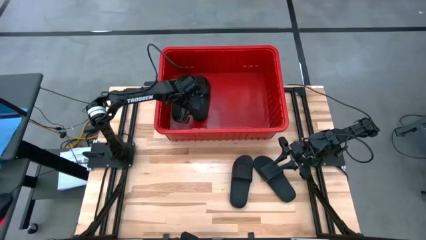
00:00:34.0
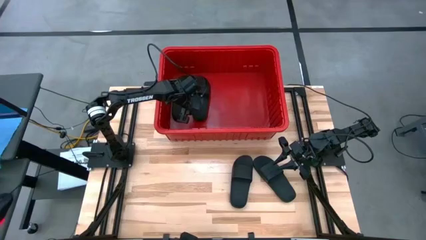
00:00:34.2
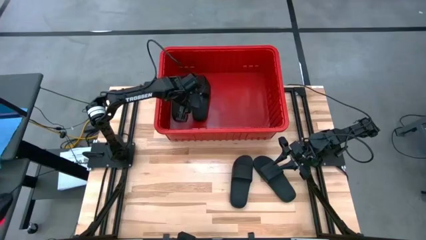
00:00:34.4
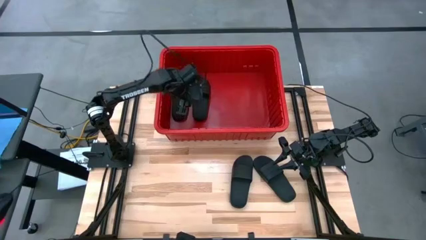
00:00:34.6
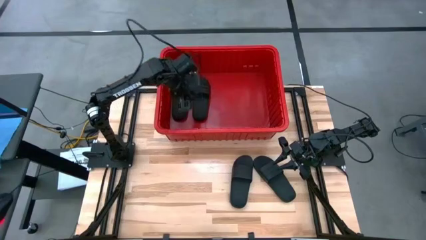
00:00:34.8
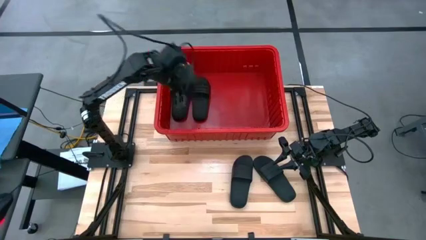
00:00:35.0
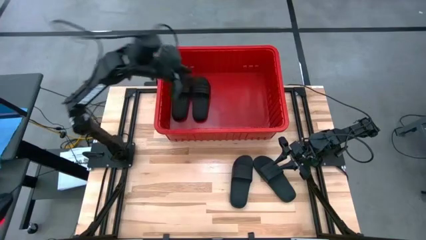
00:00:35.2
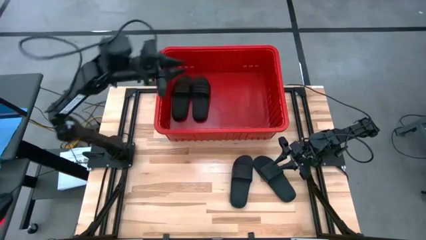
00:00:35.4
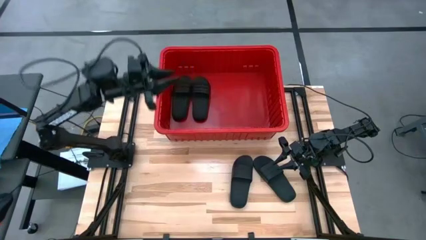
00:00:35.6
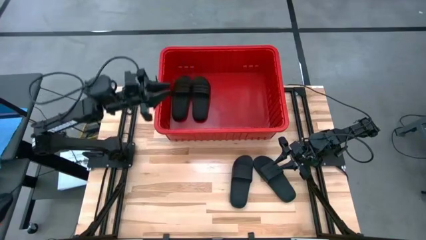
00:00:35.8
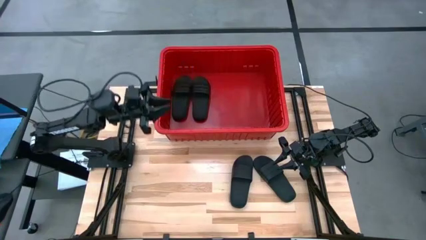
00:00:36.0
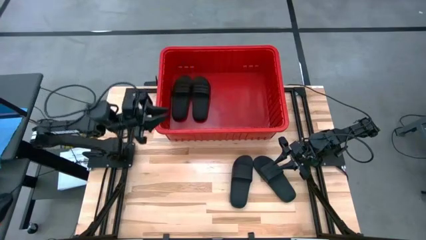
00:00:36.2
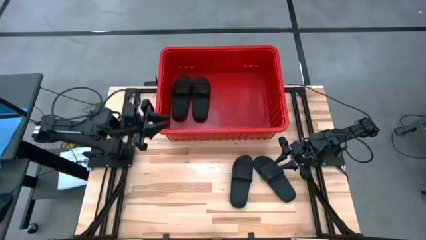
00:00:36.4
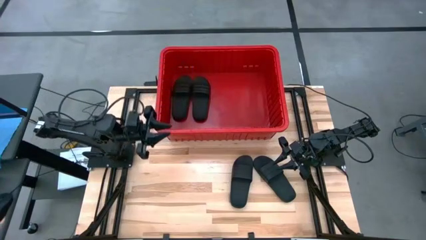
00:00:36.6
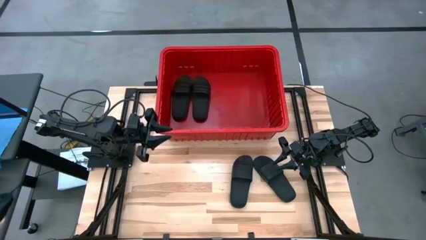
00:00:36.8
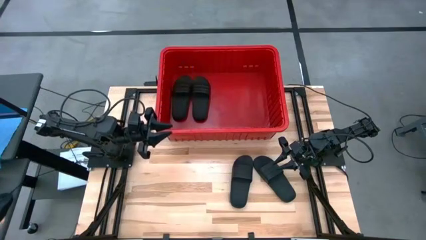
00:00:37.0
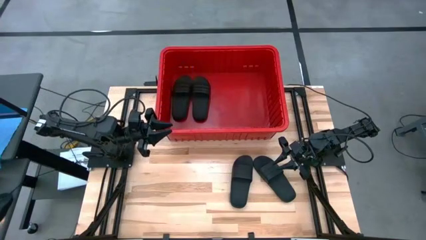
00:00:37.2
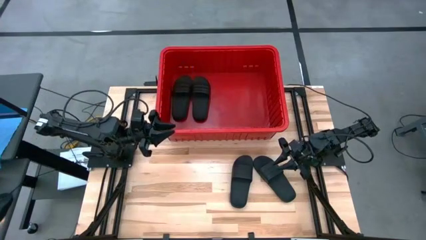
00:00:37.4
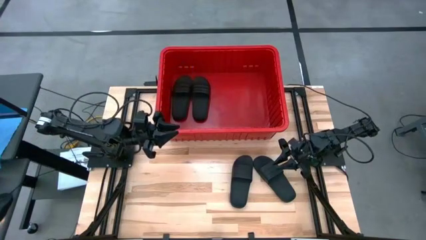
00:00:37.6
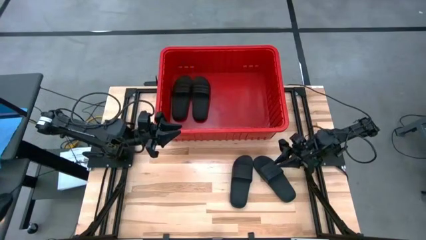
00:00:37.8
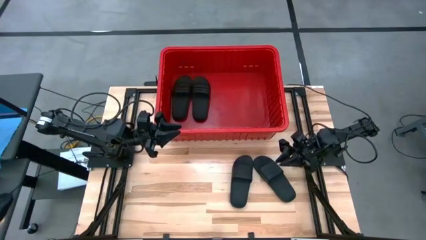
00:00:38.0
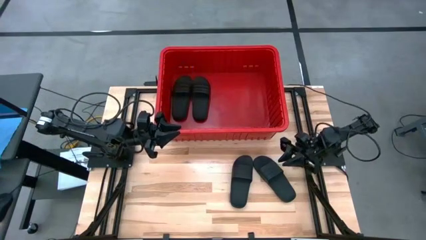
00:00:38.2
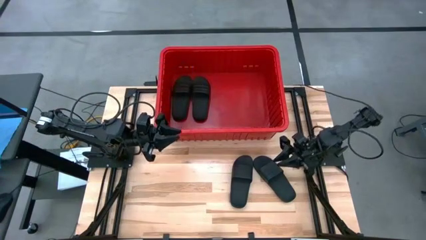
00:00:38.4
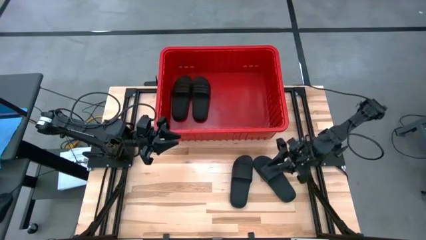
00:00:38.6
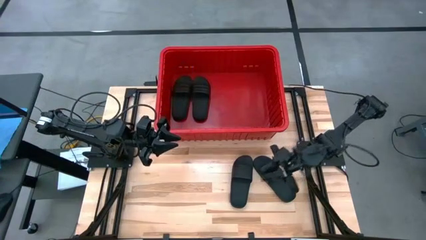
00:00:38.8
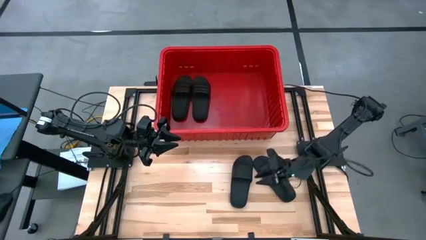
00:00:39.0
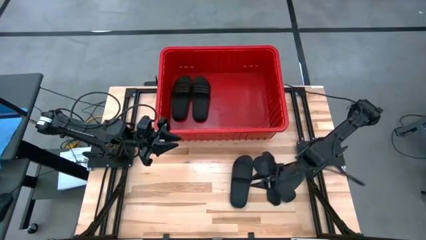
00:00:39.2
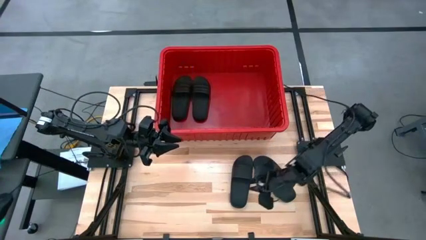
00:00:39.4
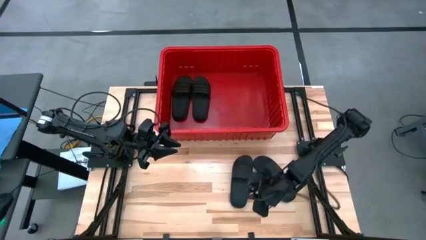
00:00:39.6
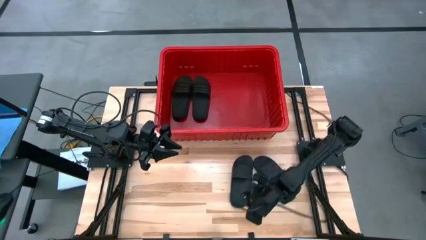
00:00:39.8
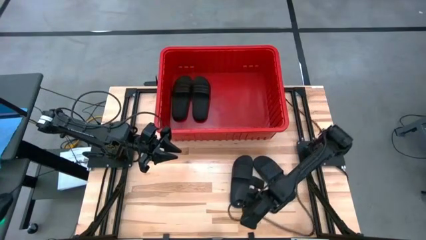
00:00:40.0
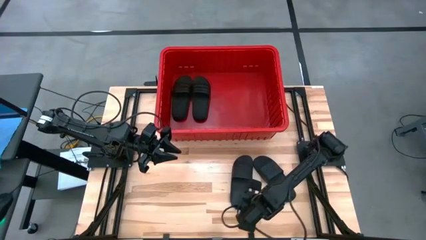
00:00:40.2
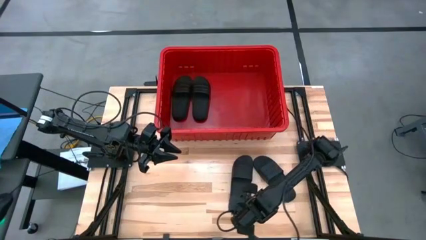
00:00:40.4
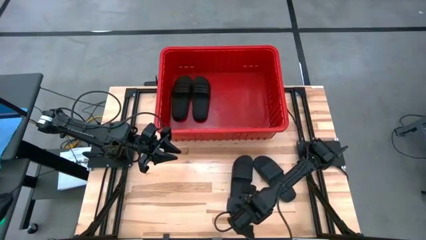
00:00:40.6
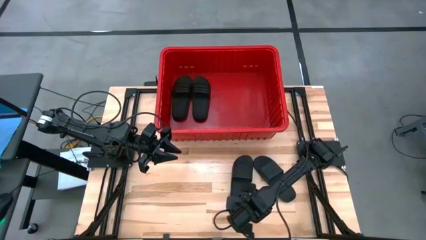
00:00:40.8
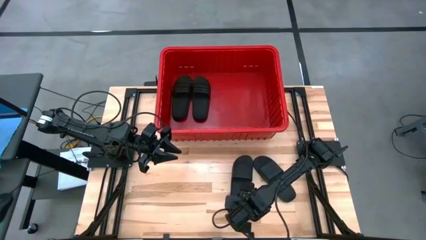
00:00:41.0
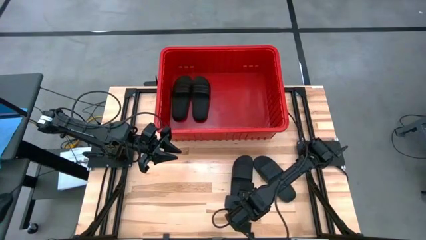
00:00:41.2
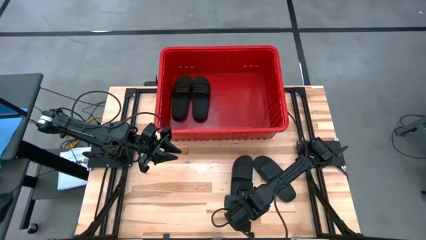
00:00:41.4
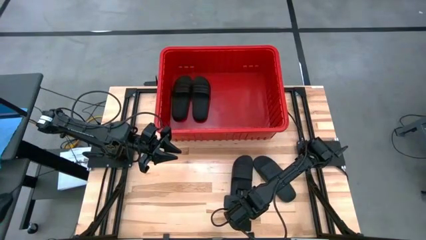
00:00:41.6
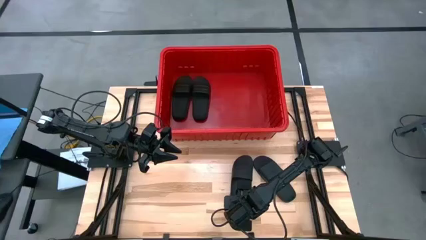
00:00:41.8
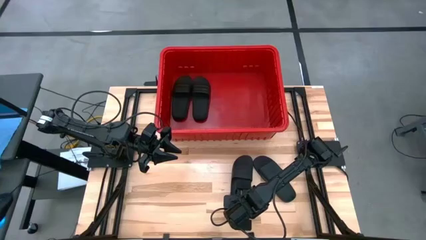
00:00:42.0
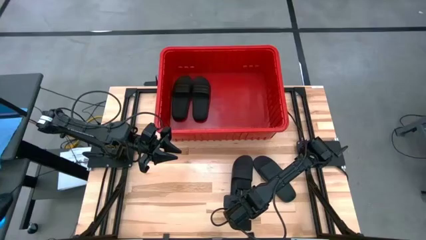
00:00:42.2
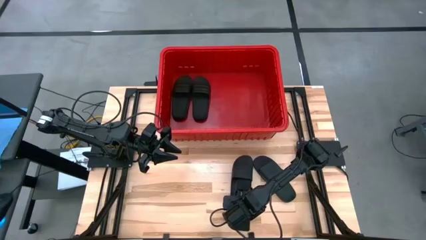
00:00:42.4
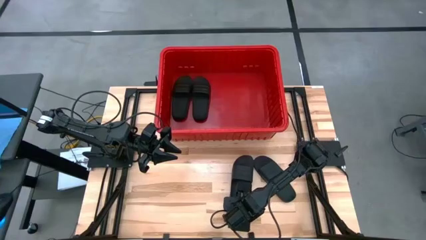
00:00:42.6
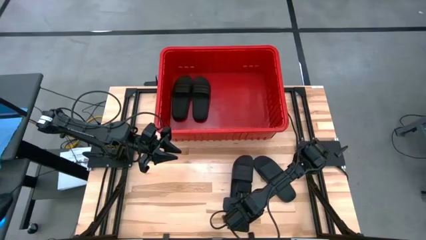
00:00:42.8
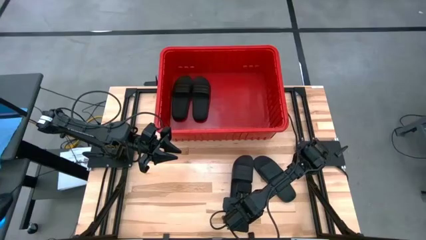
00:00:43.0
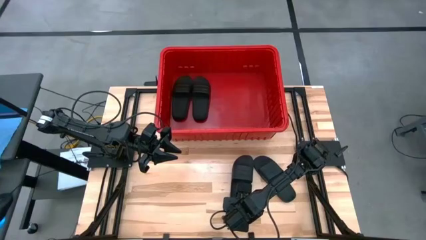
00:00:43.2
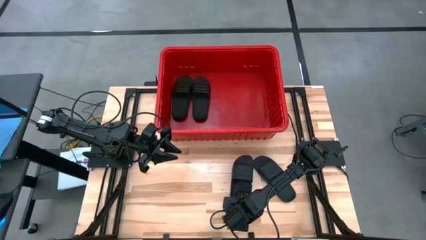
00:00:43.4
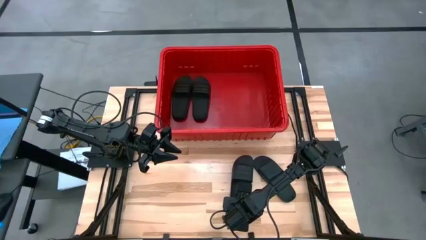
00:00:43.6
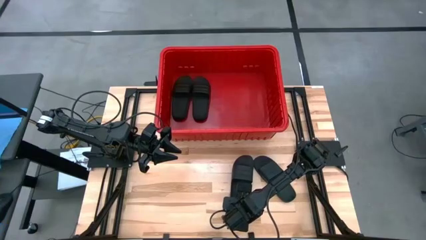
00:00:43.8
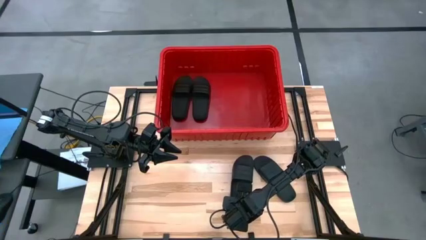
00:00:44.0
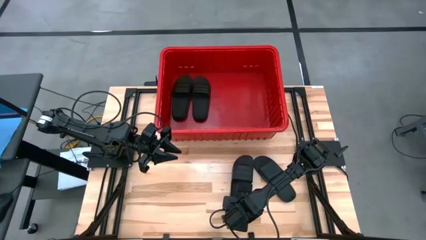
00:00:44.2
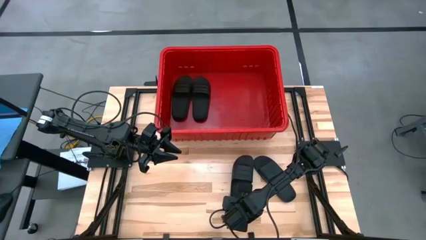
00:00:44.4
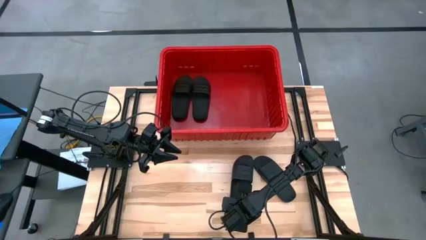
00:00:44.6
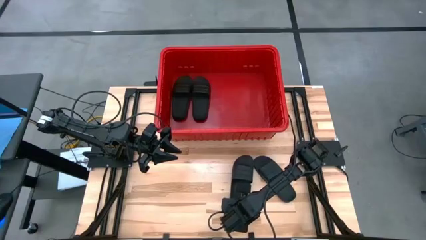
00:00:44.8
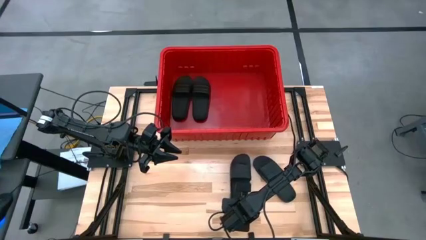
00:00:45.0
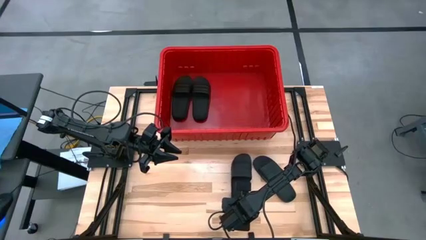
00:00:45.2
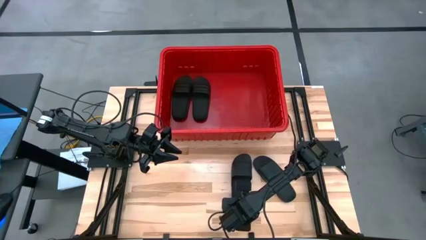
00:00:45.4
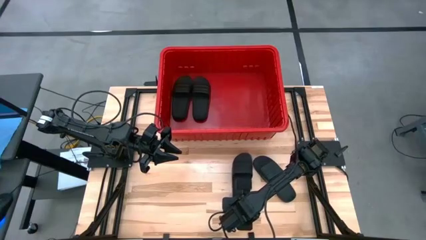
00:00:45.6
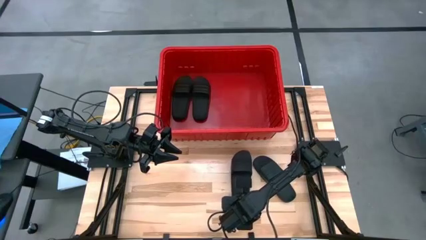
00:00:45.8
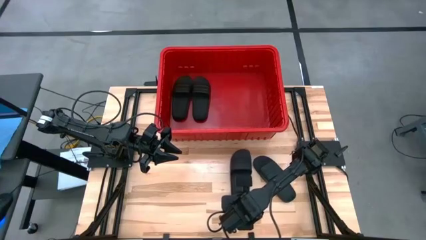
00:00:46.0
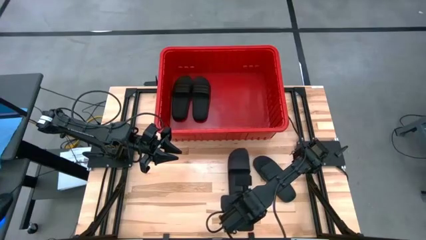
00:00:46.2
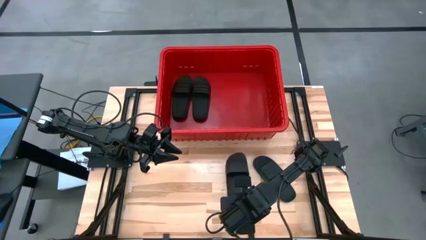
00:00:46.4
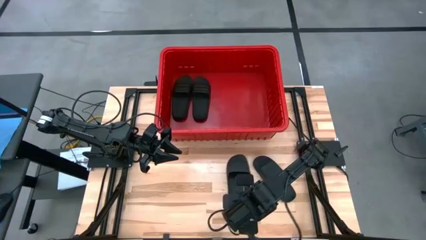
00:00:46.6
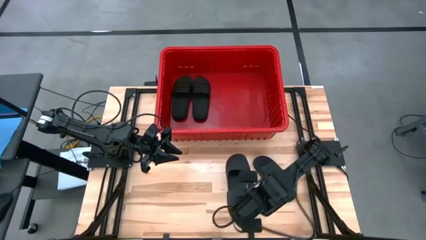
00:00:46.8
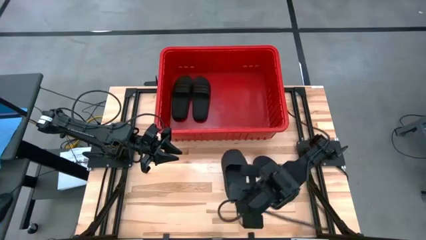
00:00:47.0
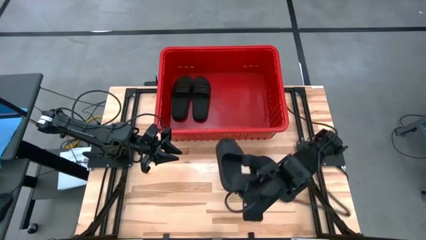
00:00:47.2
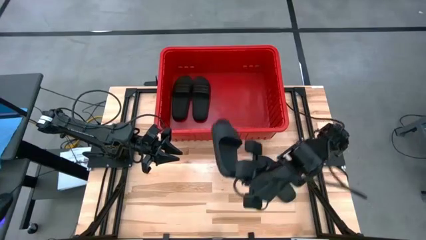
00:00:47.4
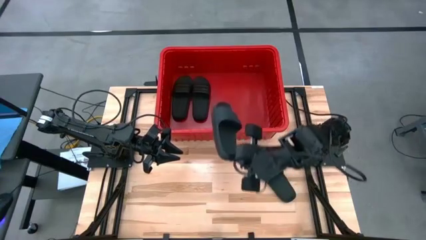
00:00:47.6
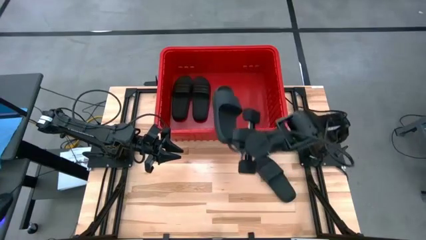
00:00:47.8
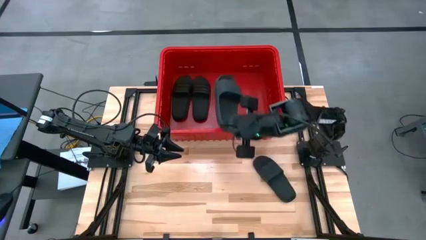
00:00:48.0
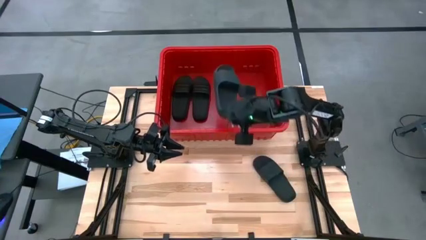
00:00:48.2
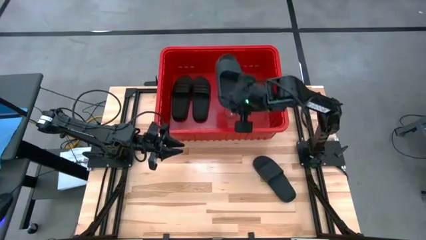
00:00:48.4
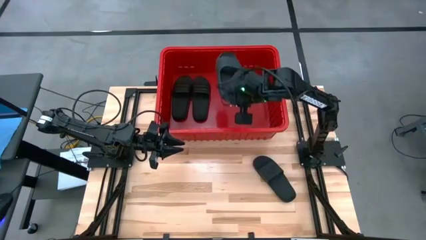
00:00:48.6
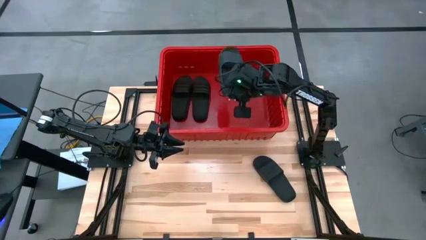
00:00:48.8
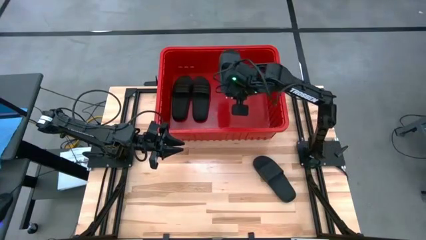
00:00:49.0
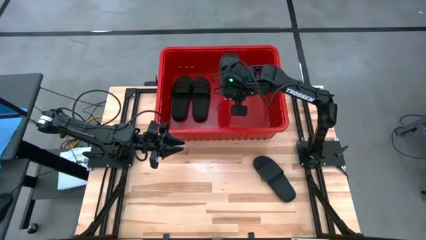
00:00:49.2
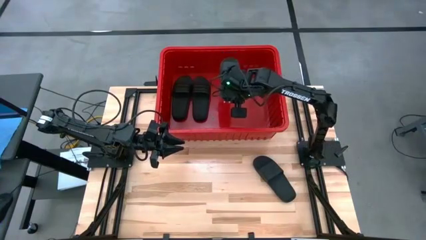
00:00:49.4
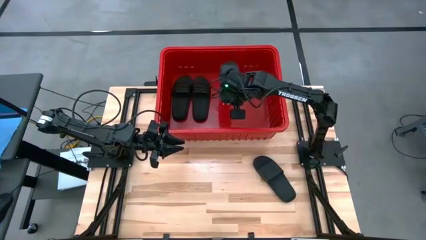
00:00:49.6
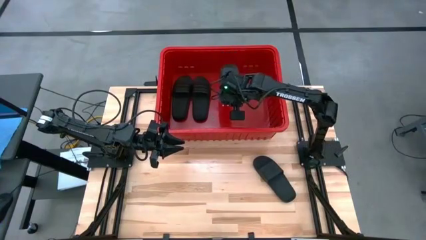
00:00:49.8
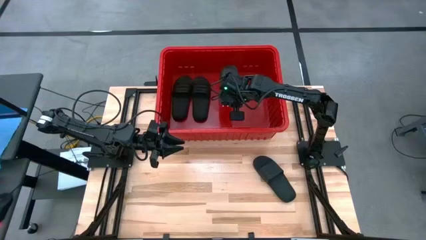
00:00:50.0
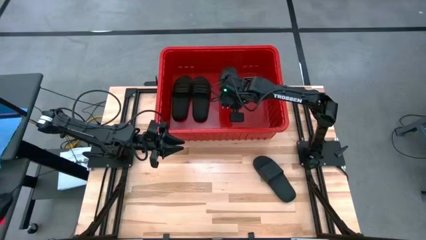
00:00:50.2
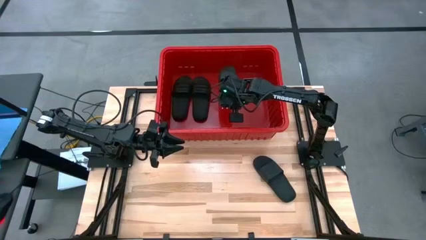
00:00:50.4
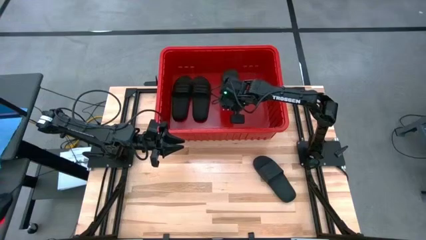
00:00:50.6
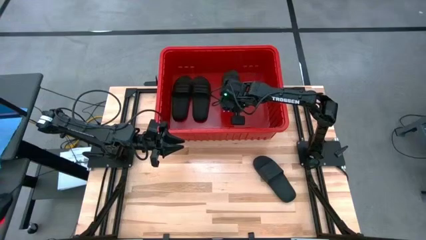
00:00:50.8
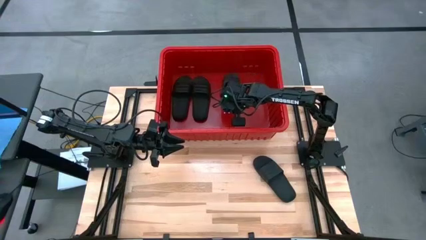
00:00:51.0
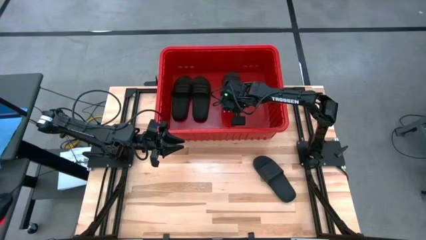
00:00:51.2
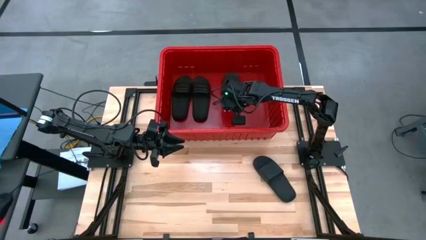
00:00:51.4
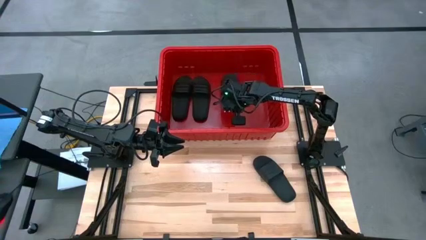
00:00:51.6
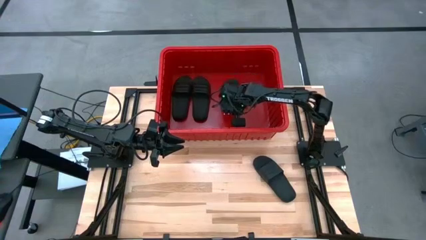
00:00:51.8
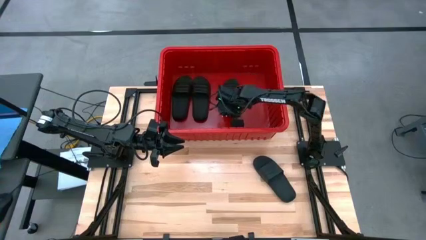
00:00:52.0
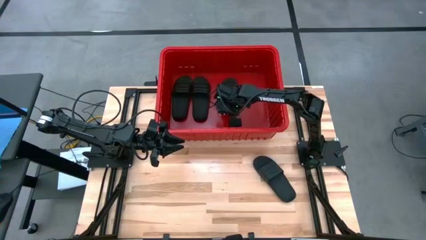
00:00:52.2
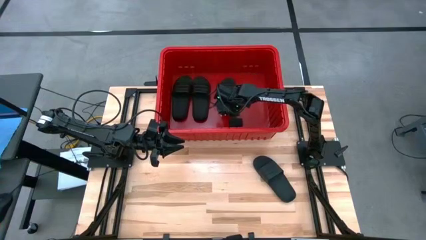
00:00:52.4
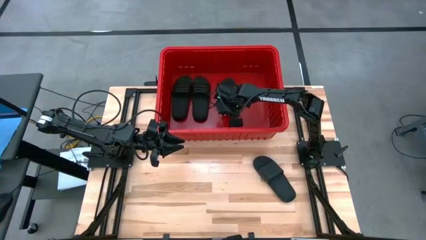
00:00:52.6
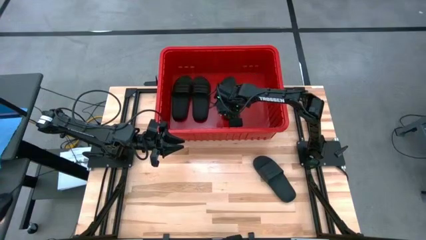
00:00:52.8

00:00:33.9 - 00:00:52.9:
Task: Pick and place slides into bin
Put the black slide into the red container
